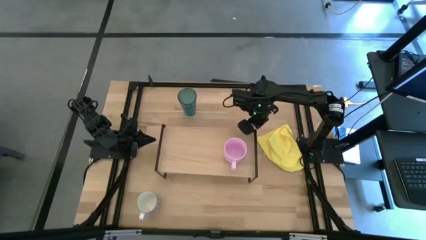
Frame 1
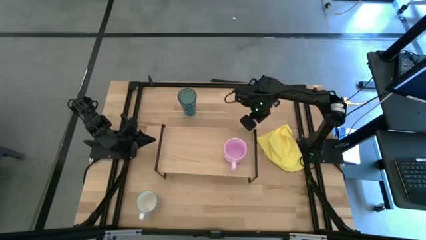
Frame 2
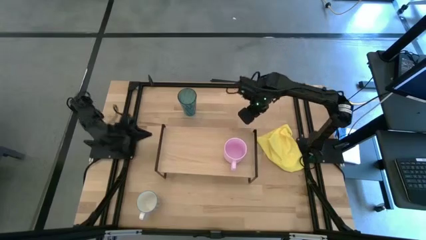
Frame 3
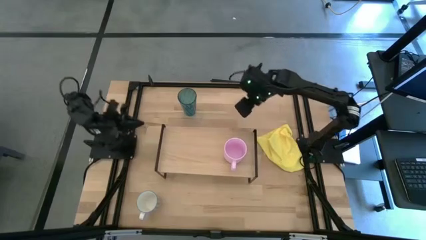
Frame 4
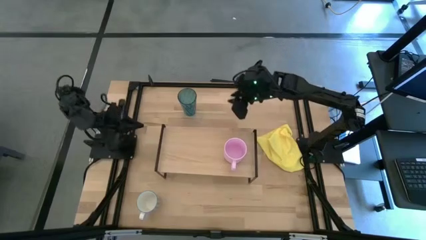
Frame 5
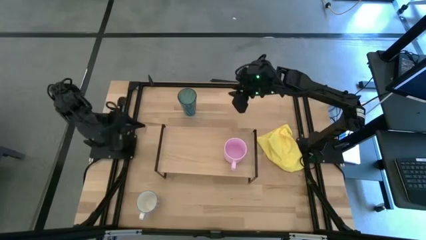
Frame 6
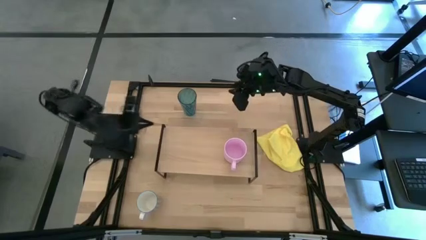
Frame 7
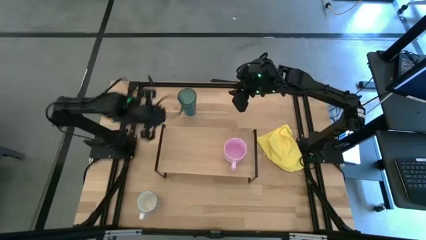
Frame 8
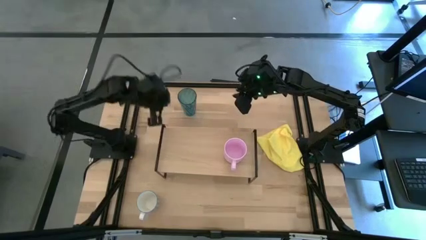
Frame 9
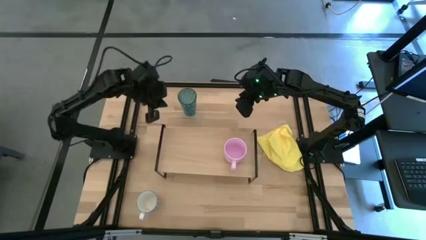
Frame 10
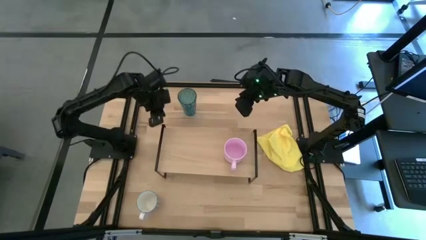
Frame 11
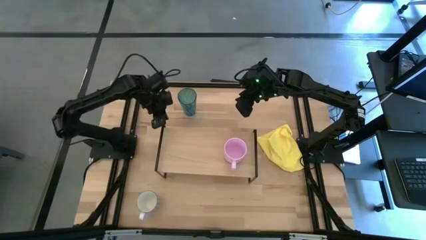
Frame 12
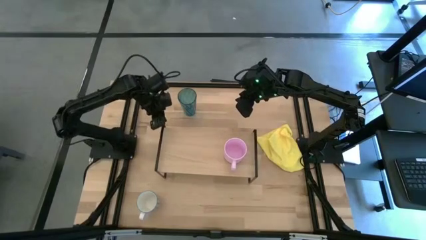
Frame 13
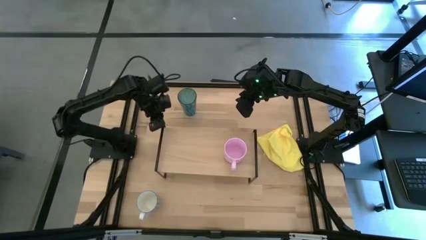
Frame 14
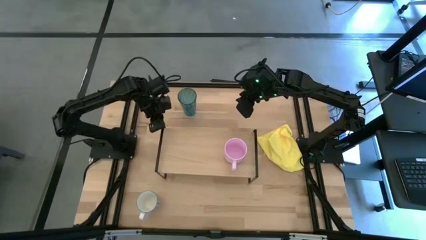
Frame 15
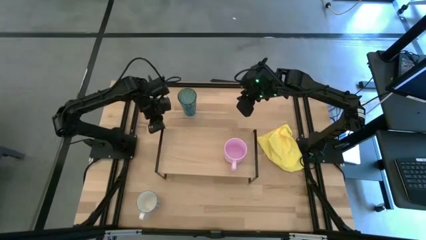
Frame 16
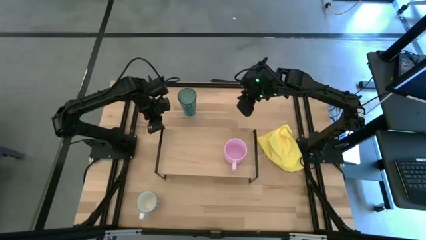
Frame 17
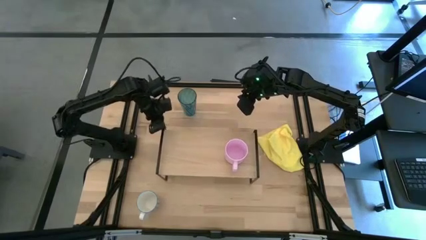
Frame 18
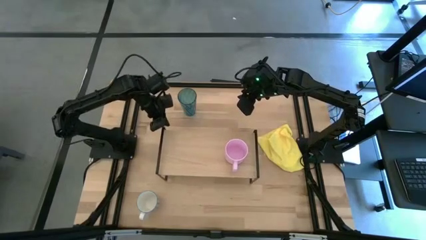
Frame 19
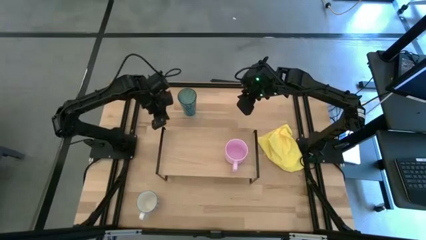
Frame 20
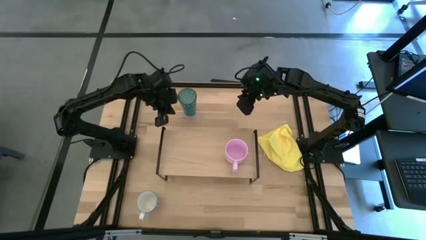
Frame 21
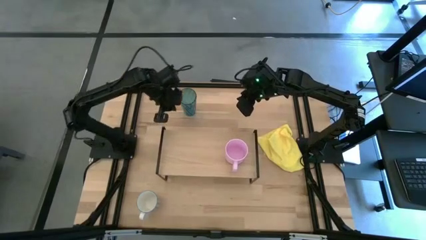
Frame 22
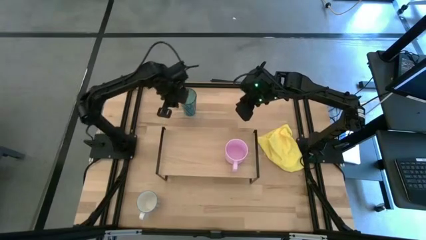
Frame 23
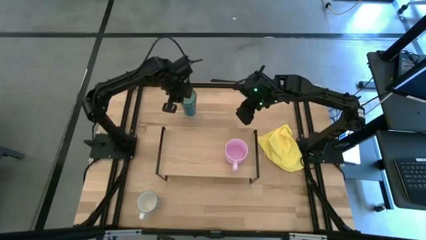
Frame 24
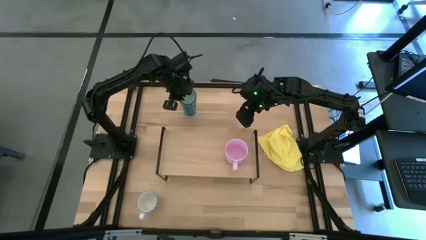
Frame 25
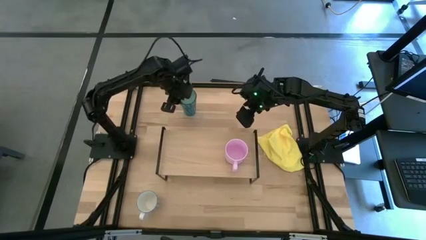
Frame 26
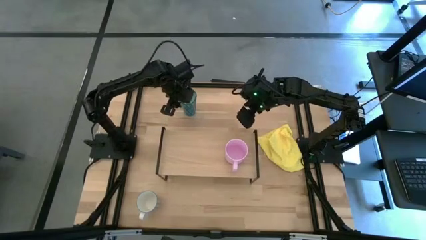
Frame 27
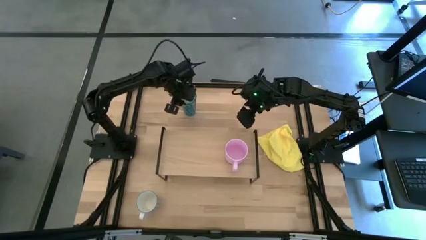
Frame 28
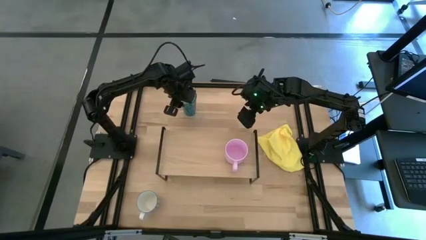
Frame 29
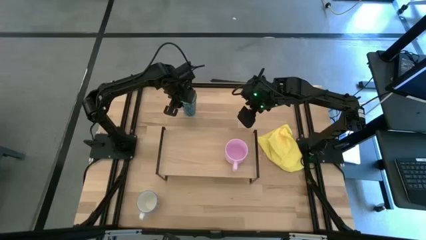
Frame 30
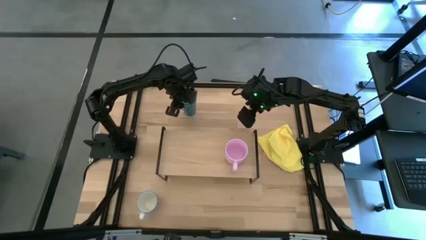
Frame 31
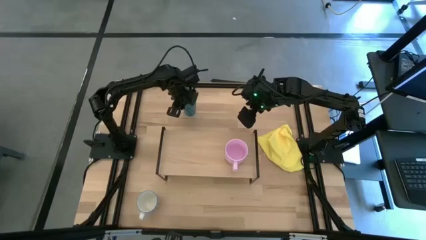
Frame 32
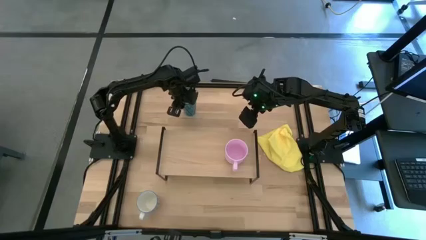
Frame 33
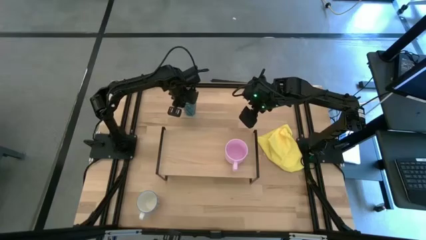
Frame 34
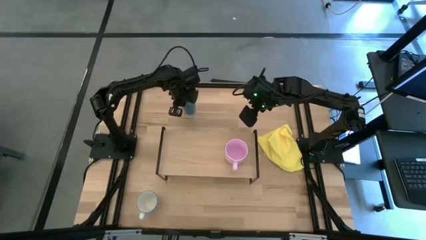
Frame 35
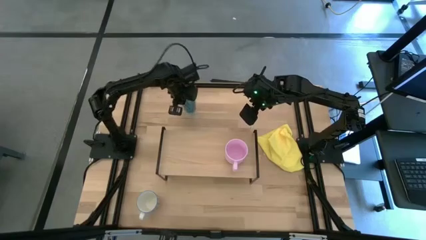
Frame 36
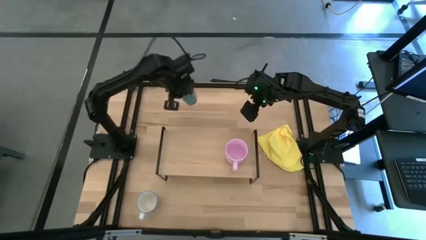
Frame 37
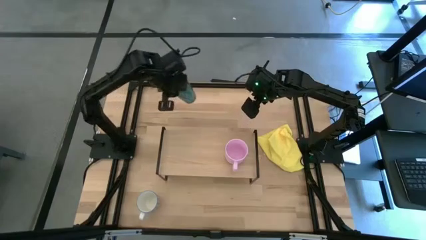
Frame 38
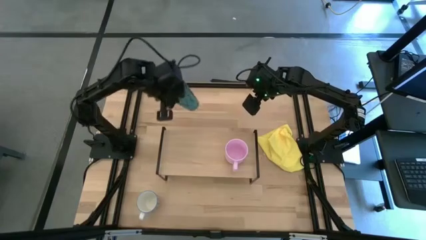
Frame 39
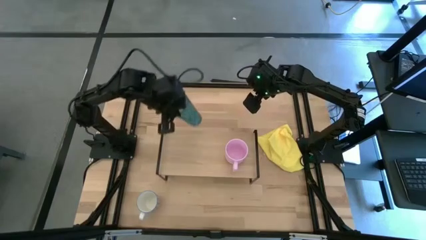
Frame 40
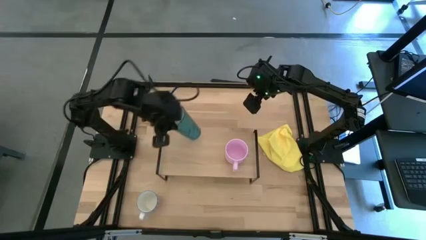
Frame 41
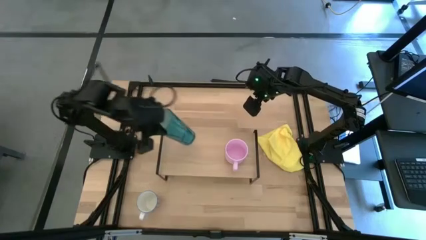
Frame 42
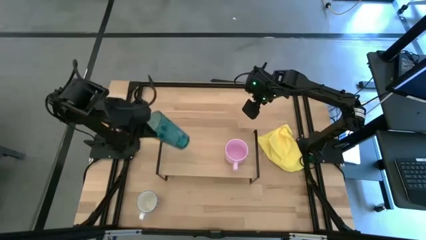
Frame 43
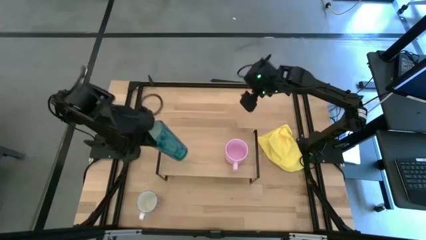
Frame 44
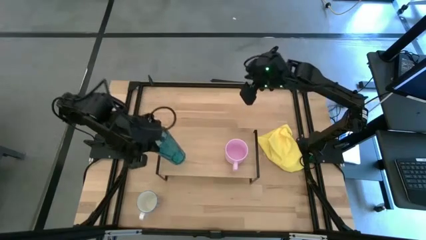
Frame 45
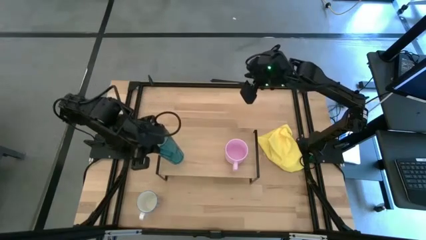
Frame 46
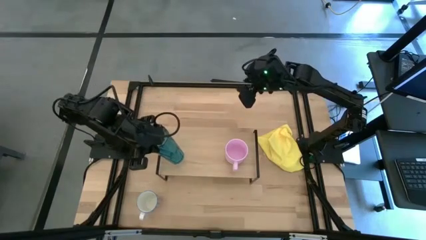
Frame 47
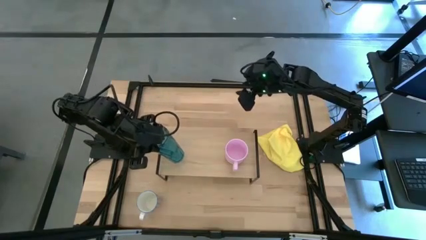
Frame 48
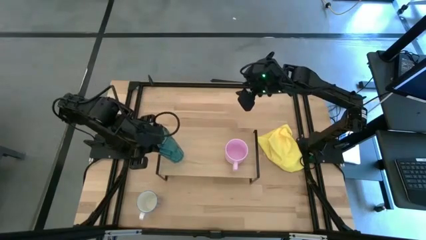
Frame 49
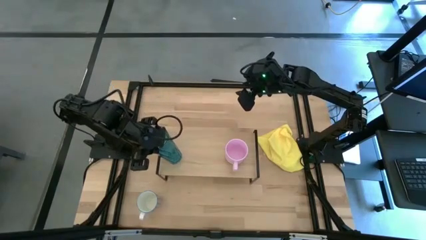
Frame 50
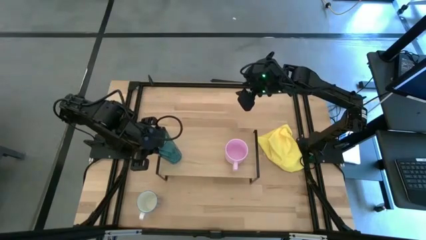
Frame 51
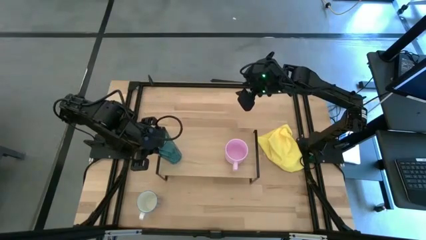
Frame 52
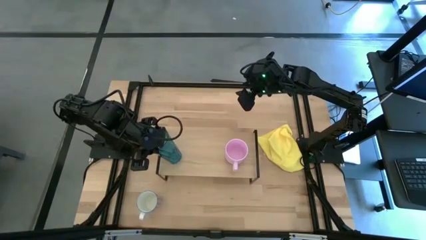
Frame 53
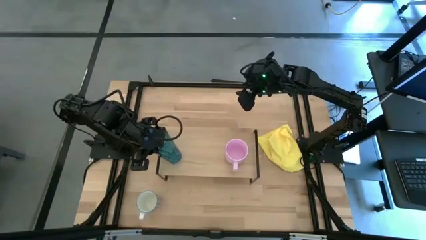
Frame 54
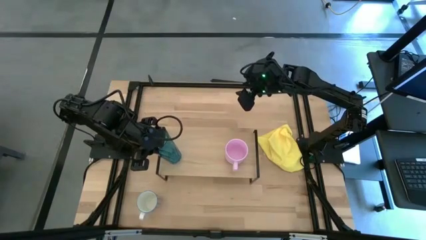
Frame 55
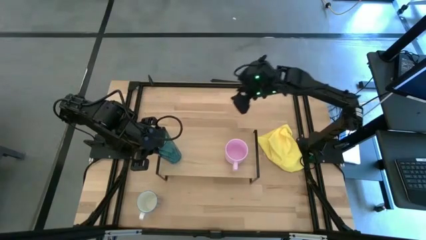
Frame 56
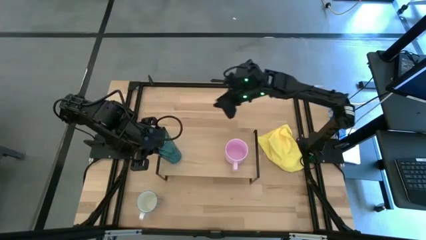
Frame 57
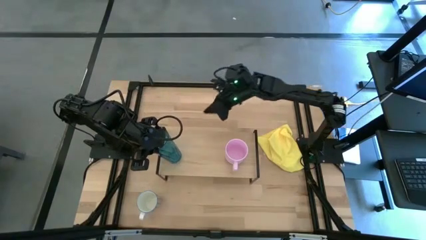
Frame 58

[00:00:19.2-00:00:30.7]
Task: Stack small to large cups/mugs on shelf
Put the blue cup on the shelf
